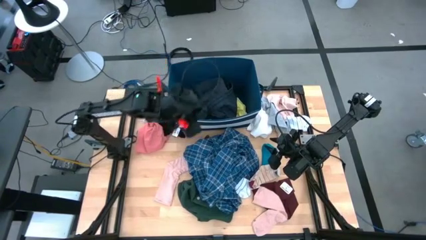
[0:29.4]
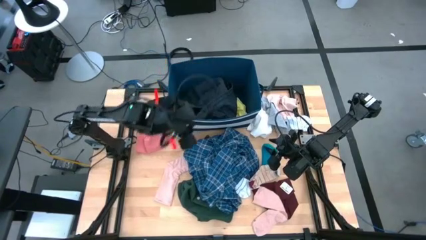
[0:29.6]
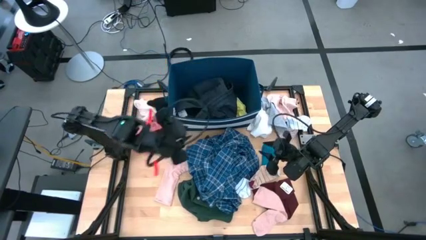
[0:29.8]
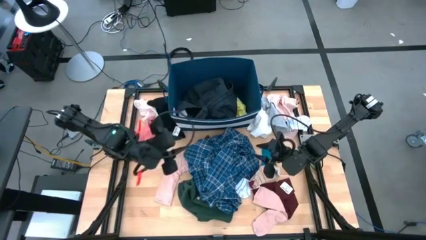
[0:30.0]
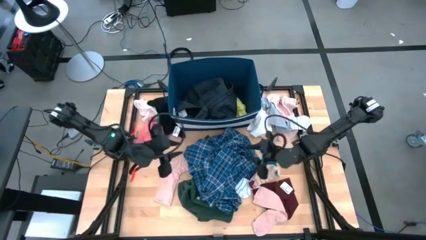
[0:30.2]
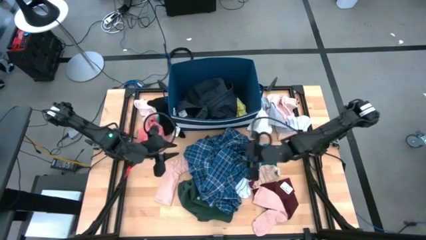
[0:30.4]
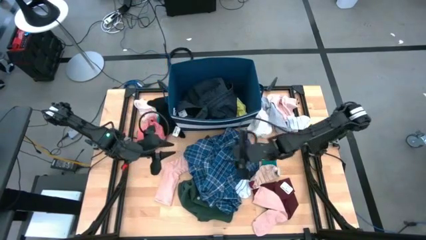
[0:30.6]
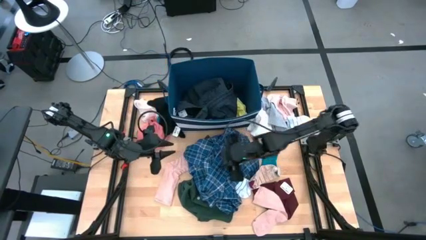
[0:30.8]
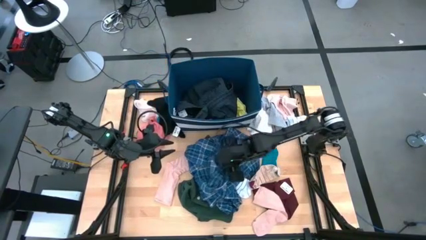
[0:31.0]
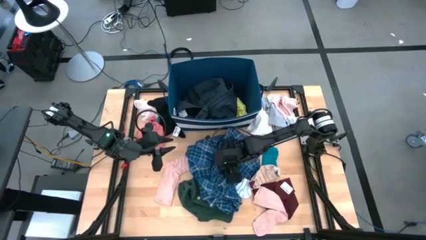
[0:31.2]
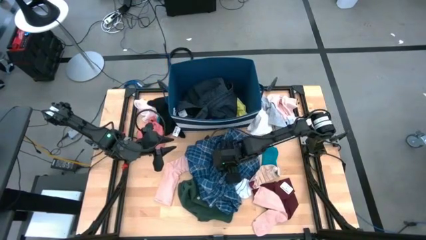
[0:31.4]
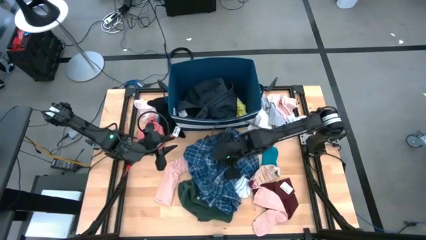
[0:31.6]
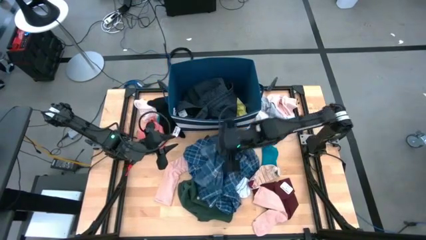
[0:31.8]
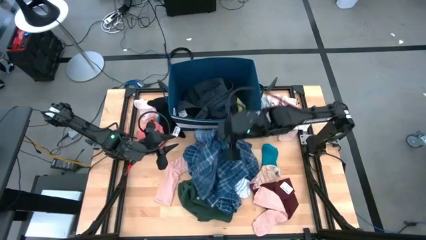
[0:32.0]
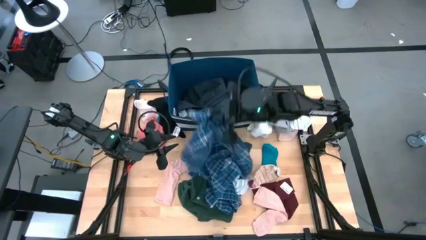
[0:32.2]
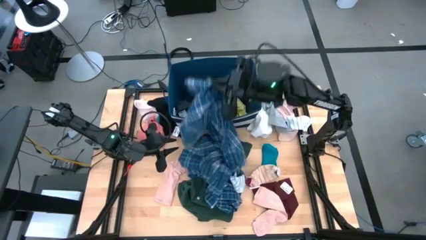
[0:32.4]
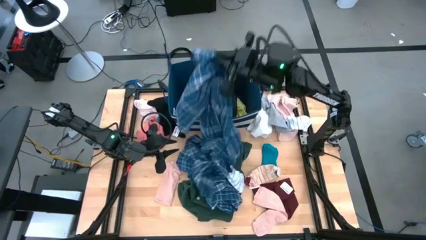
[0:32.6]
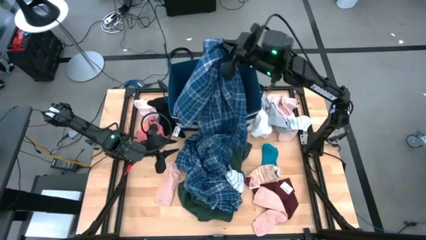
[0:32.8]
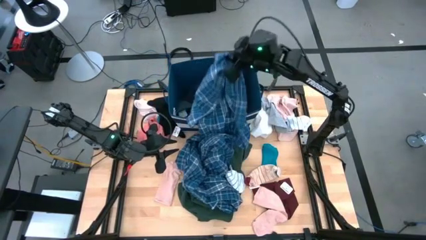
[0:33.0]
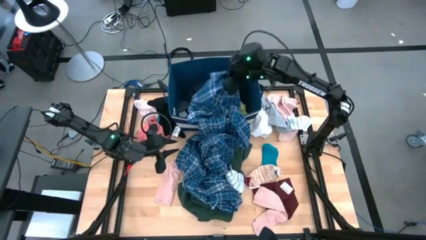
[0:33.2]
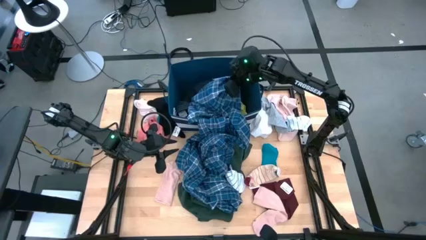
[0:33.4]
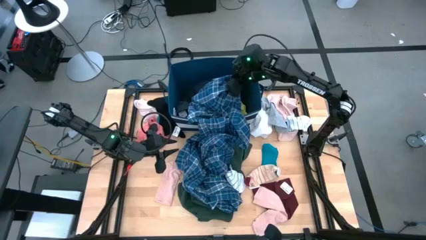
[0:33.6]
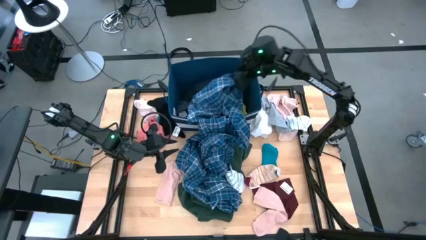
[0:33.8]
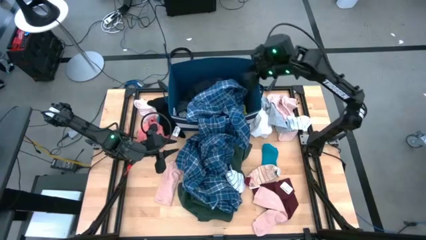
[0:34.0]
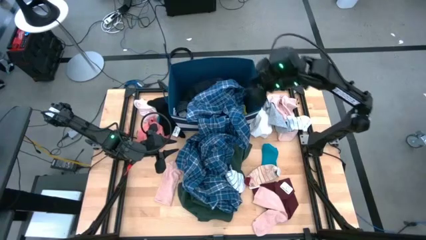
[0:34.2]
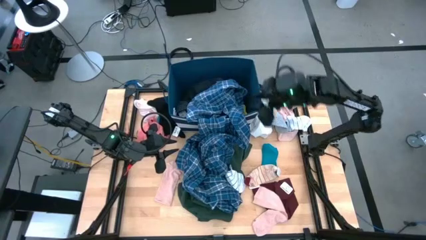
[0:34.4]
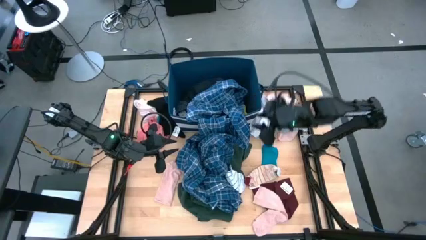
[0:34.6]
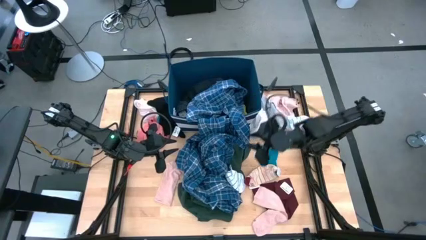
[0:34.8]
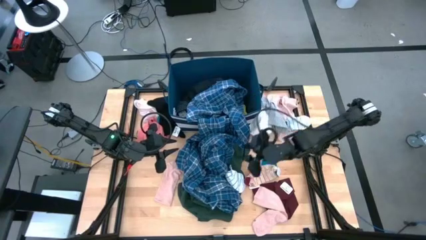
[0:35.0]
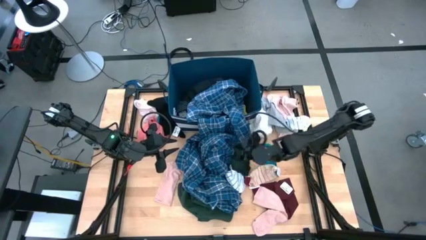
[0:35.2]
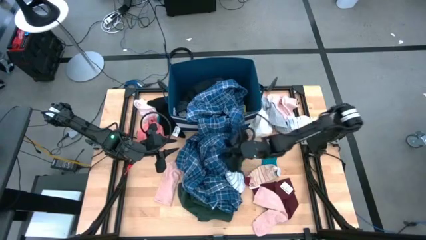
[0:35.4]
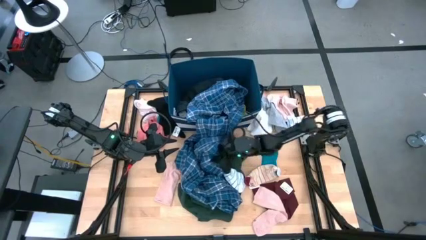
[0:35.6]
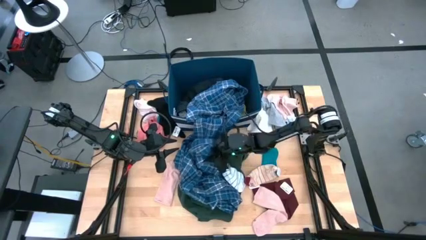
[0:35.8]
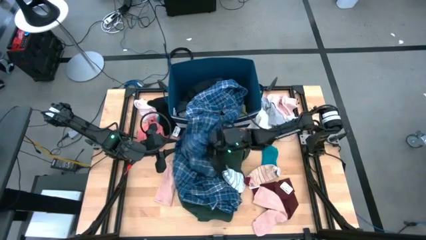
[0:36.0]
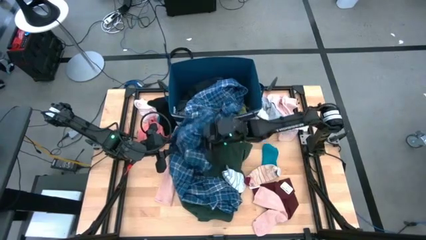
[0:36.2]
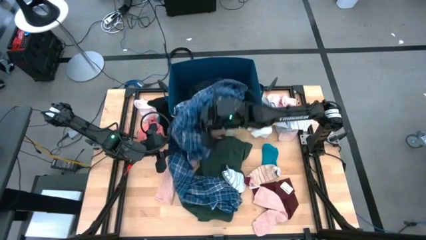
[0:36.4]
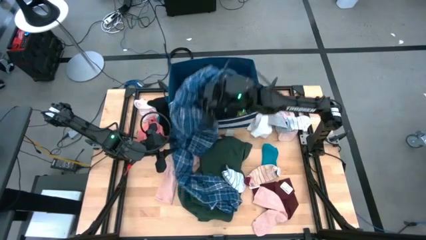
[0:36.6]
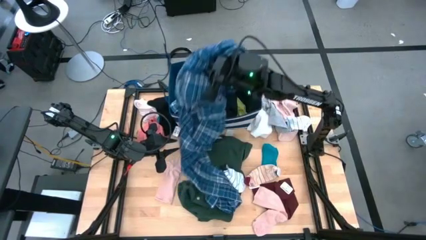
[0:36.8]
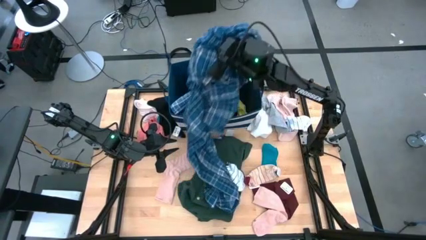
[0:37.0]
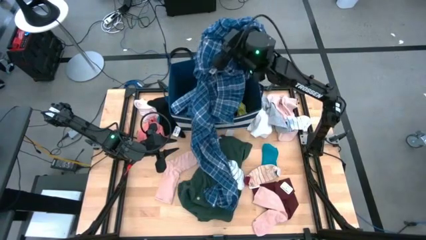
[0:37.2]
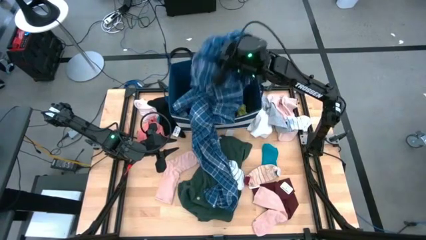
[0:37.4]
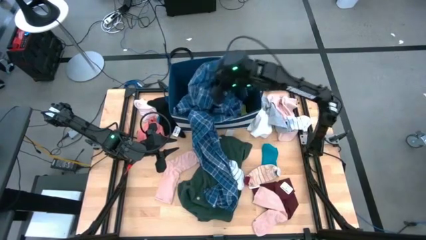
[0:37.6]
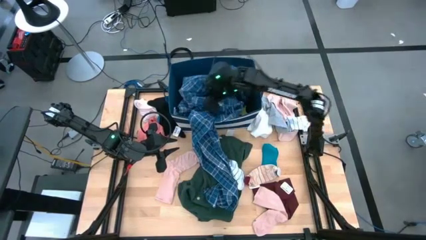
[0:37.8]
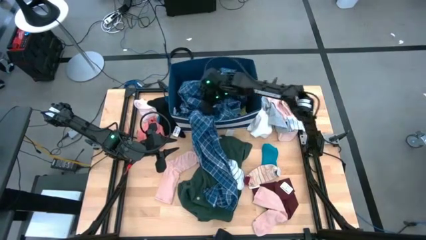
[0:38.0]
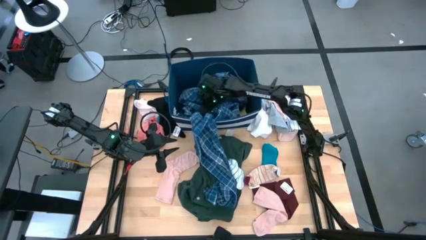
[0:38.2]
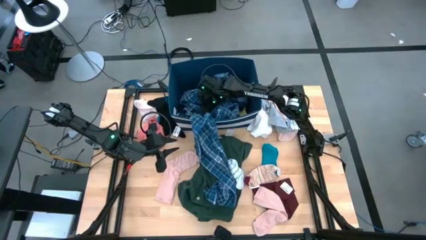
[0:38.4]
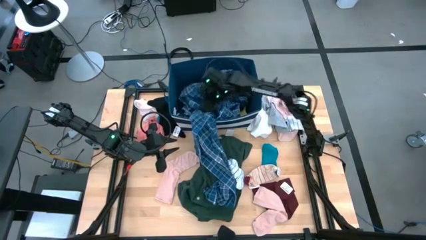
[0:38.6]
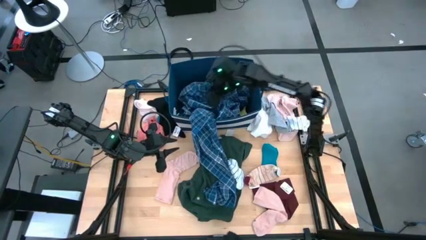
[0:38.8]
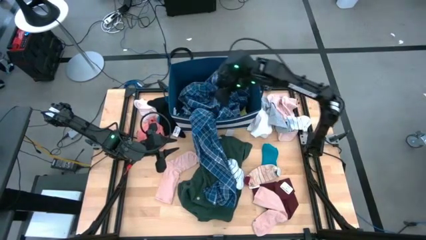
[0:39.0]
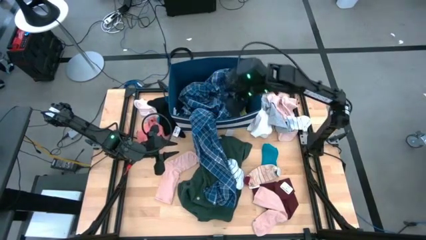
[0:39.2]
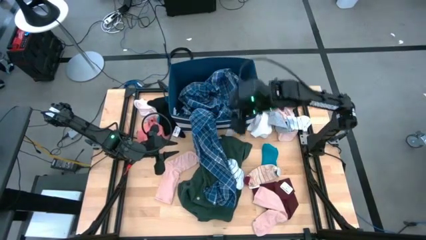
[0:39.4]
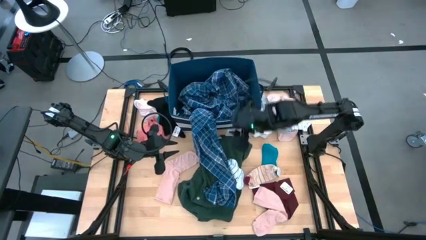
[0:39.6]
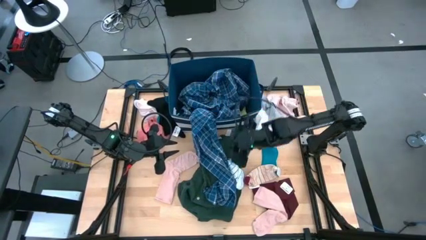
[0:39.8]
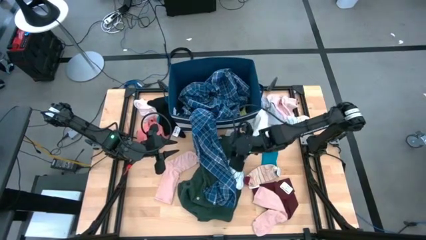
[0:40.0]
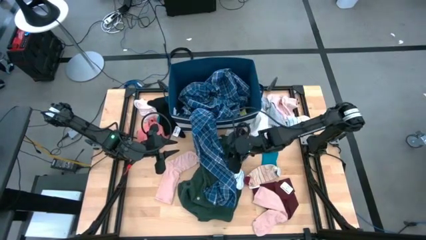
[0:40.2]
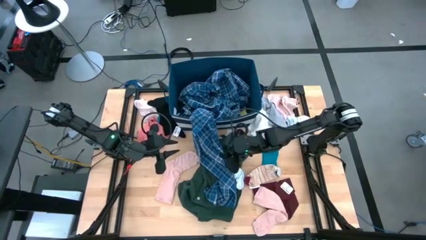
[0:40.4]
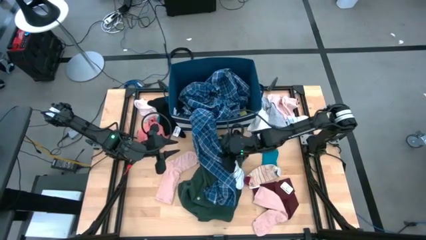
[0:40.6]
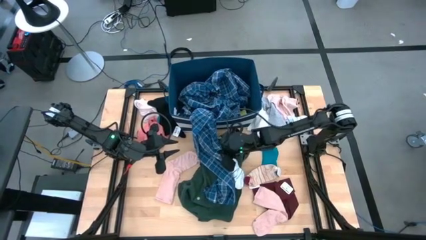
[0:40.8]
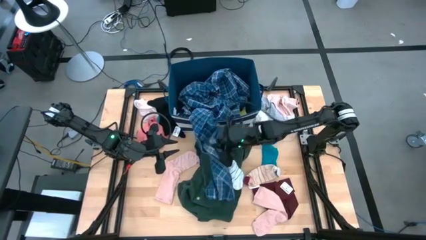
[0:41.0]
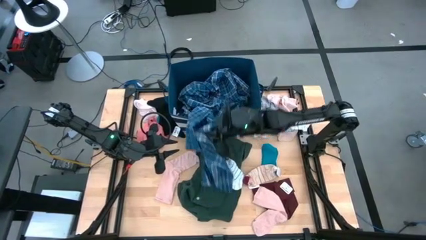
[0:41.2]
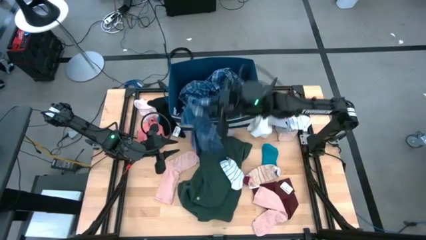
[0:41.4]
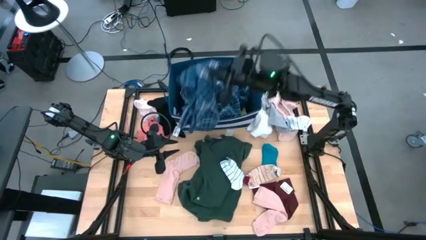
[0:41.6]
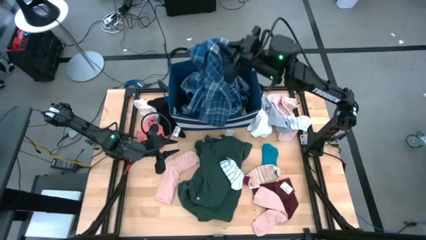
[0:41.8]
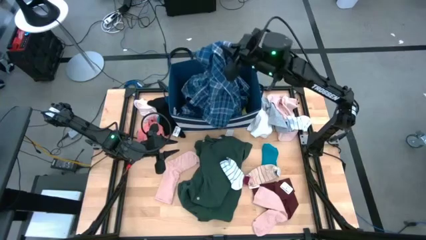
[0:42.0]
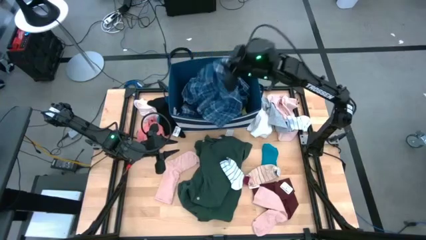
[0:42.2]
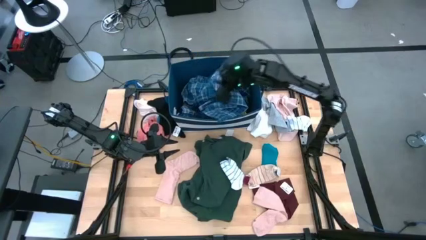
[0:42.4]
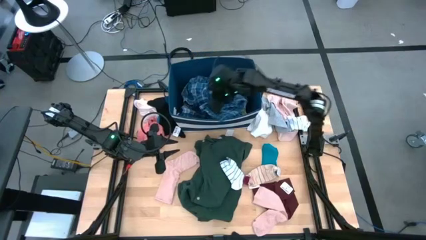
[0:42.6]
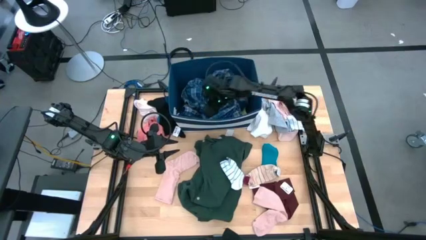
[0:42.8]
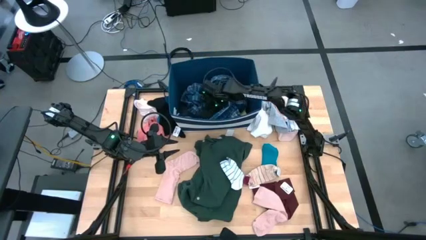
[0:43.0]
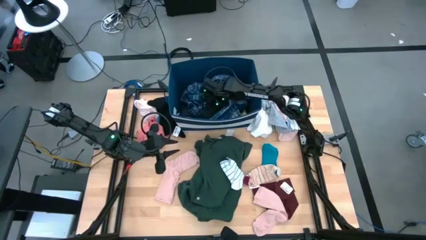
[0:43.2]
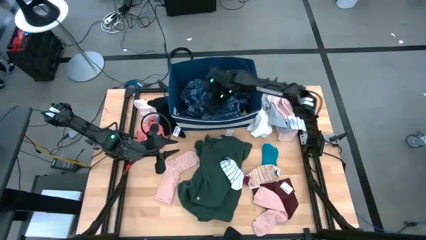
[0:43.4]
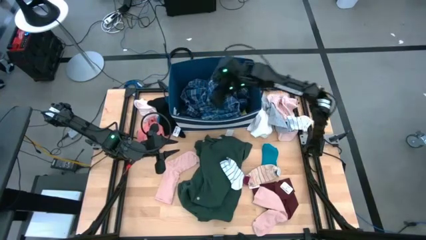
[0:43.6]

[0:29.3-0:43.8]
Task: Sort clothes
Put the blue checkered polo into the blue laundry bin
